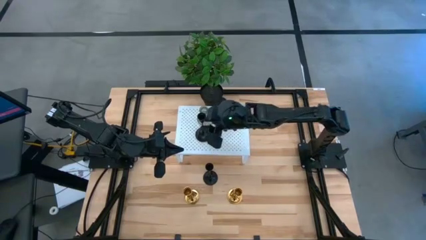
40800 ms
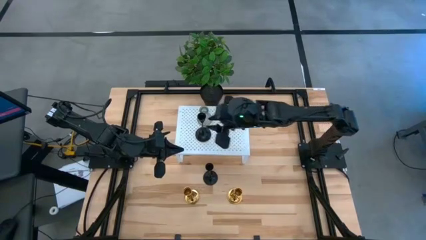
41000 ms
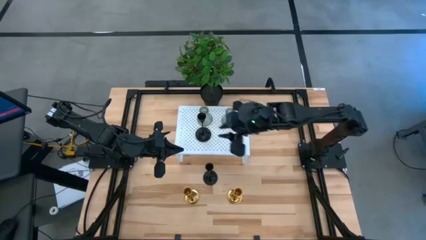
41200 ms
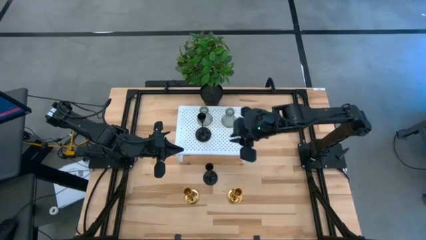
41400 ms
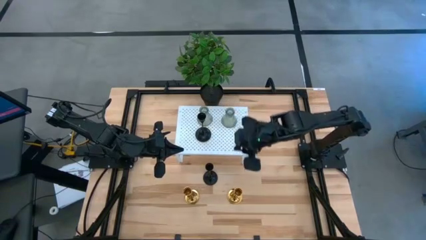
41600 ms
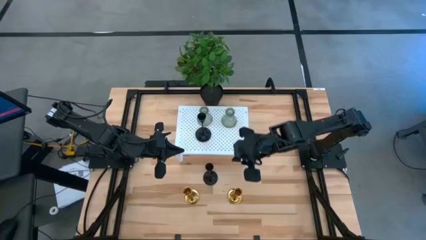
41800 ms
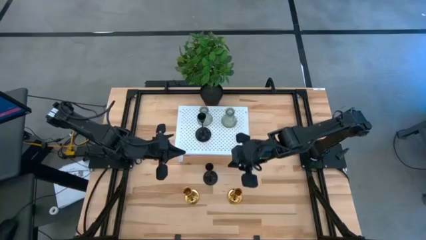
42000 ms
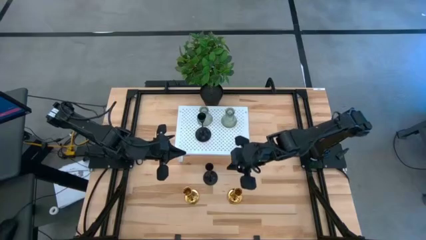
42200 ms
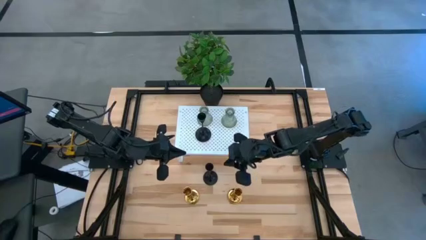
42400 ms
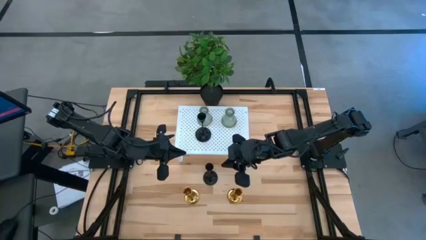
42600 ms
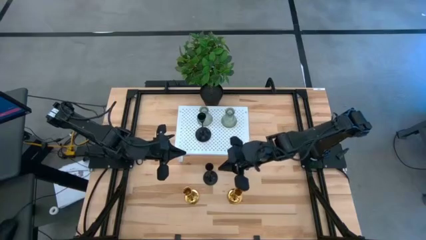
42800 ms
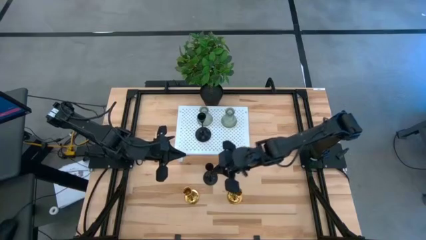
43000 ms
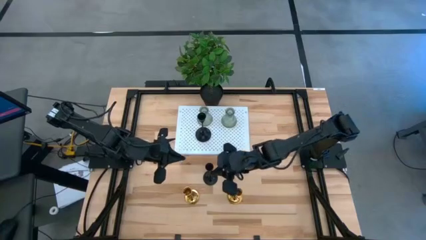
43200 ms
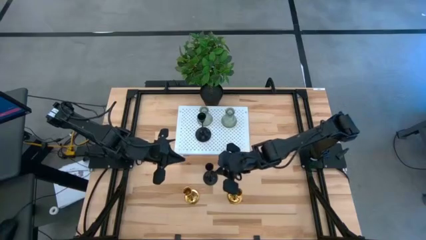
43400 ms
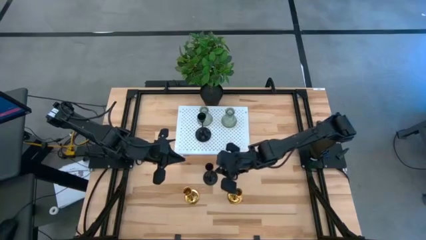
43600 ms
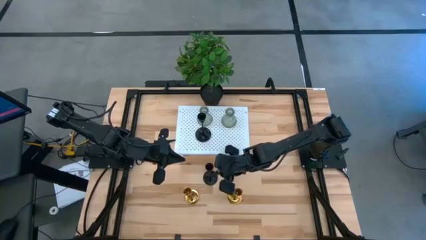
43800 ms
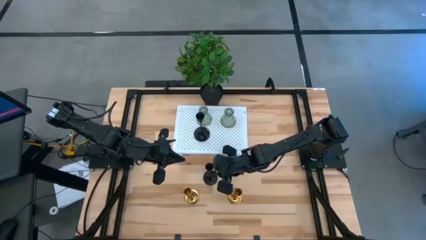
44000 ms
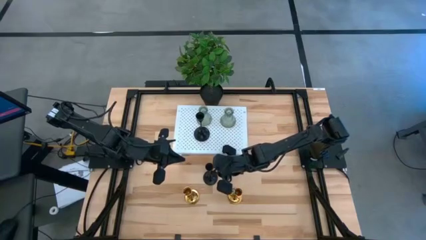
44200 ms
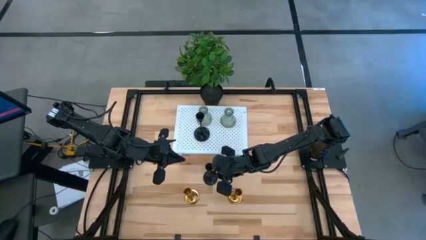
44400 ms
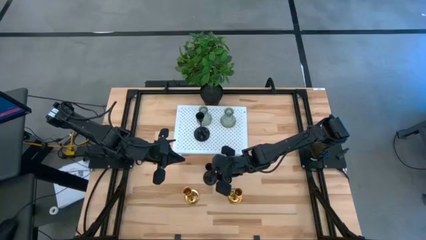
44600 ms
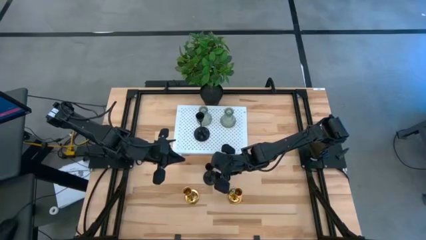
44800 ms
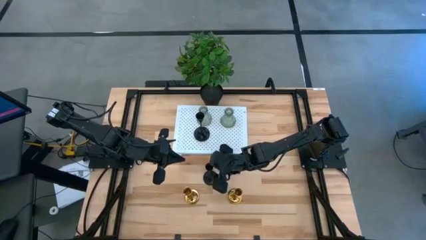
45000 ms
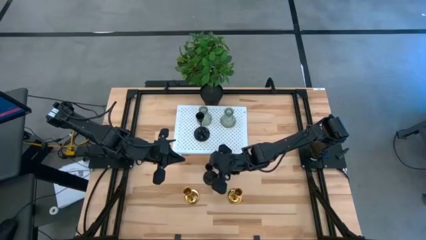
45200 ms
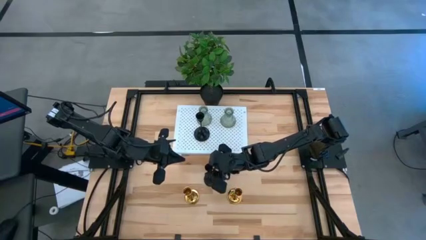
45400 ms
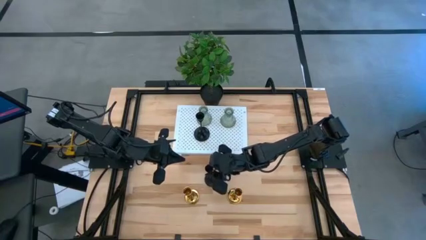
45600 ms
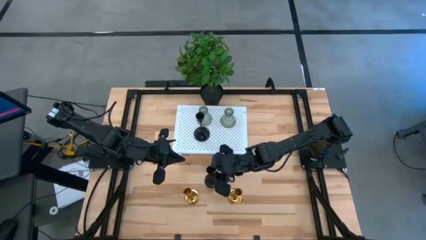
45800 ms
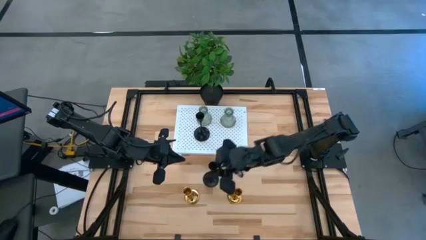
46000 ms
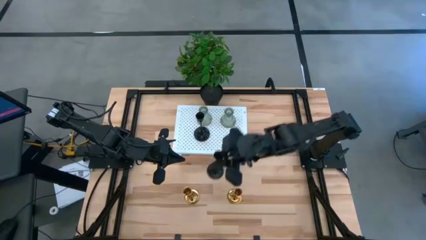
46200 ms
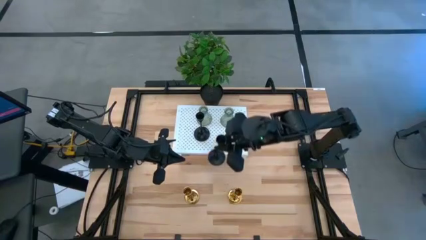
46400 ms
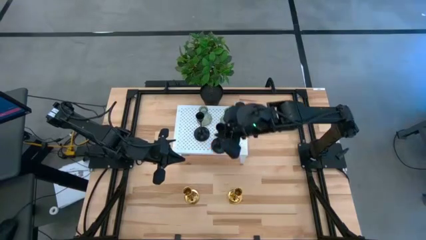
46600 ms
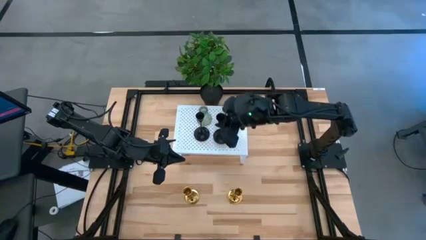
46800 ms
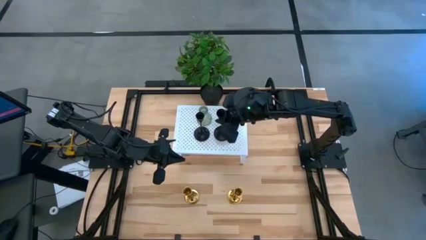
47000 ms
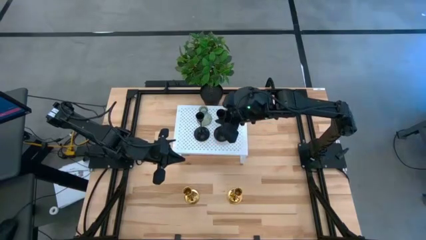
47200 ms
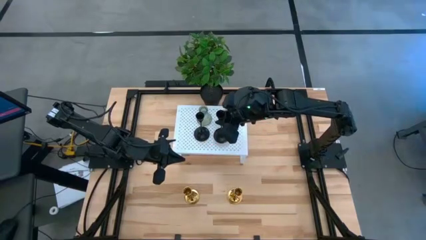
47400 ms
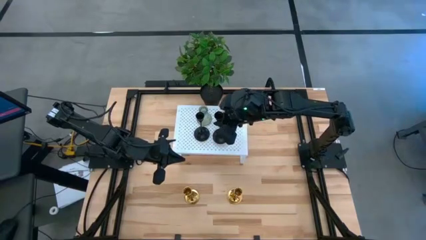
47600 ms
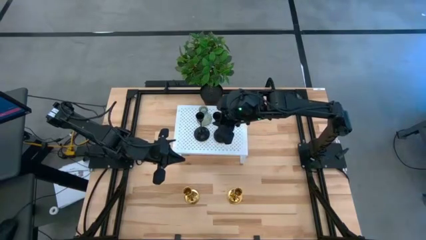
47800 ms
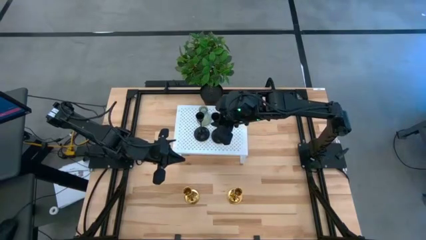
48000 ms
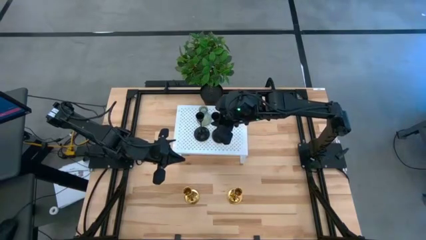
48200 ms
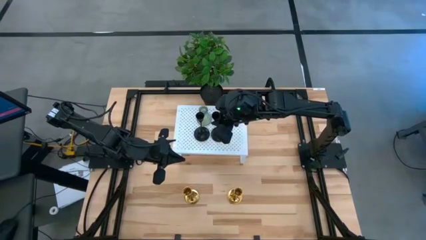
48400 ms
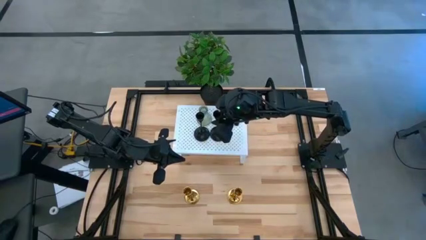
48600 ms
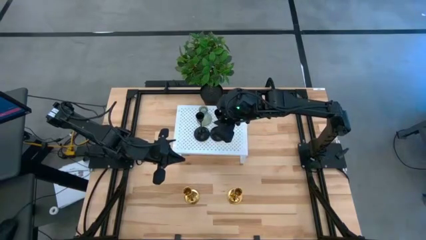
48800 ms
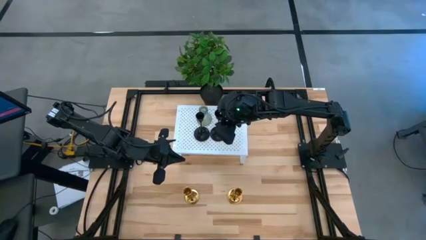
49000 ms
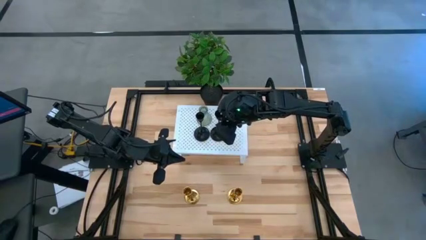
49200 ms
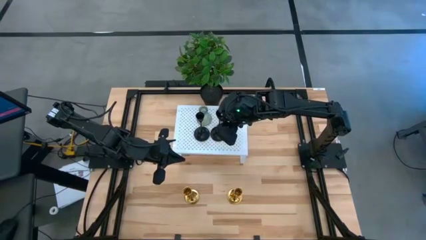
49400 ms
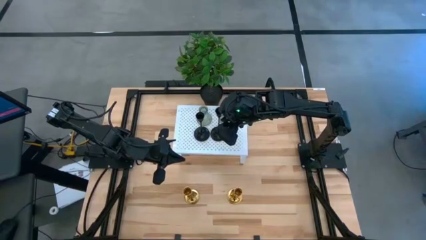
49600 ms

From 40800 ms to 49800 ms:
Task: Pick & Place candle stick holders
Put the black candle holder on the shelf

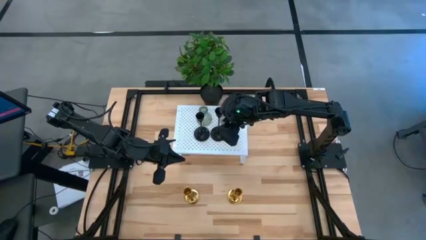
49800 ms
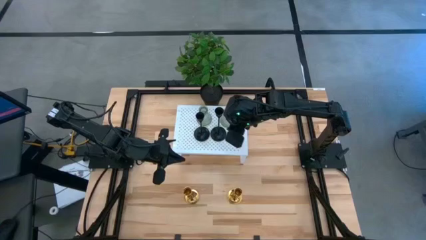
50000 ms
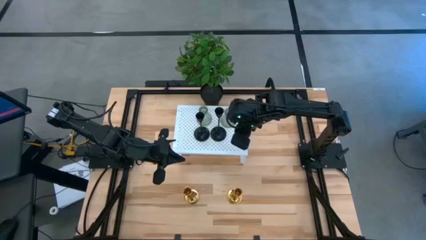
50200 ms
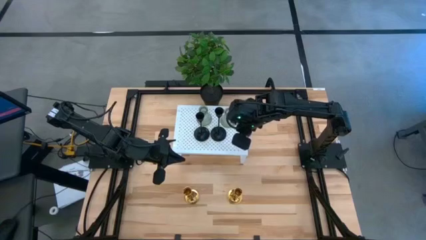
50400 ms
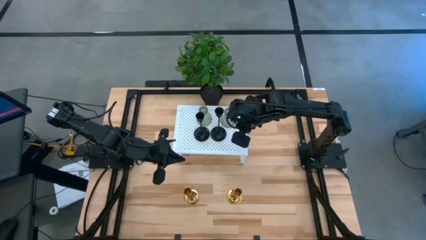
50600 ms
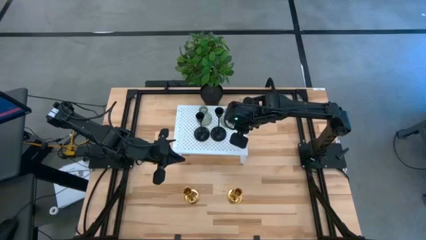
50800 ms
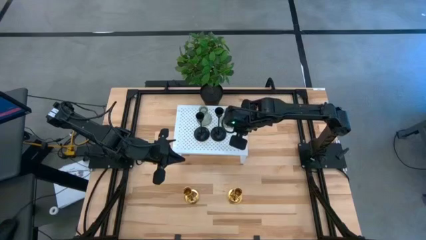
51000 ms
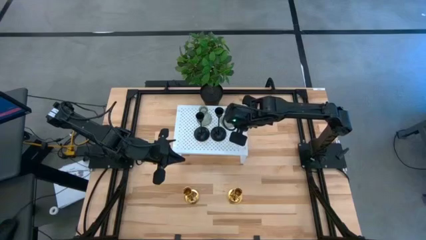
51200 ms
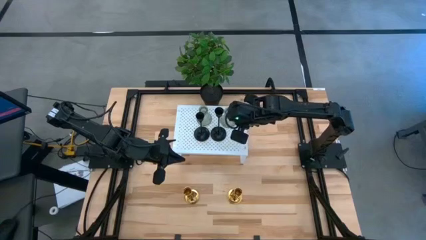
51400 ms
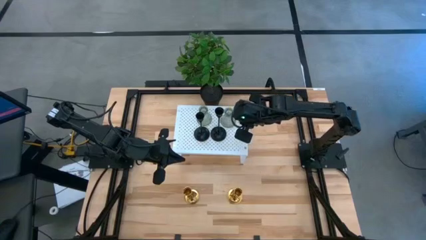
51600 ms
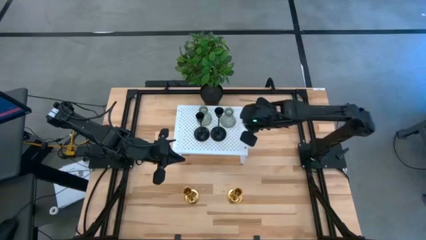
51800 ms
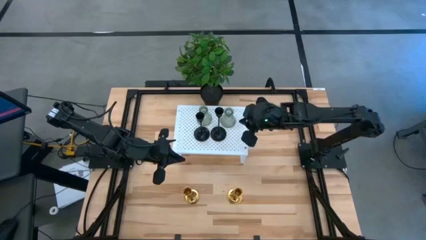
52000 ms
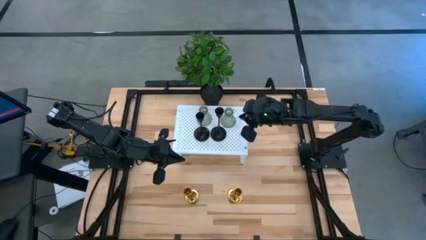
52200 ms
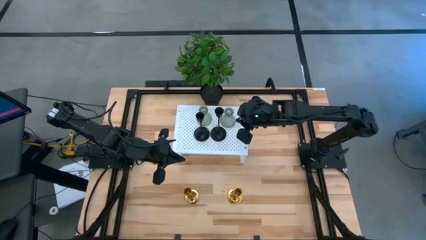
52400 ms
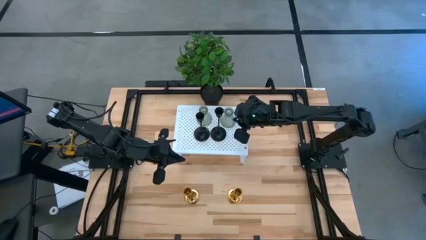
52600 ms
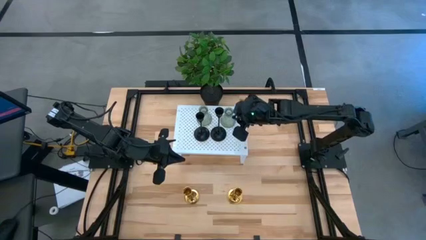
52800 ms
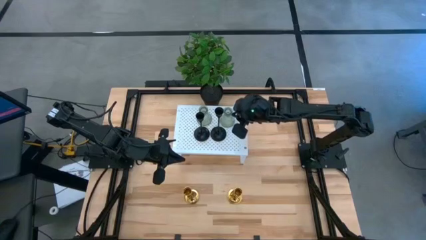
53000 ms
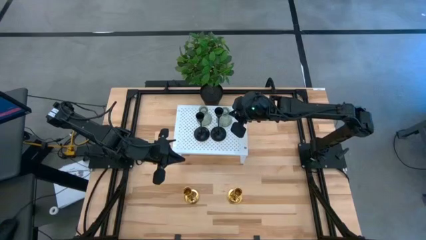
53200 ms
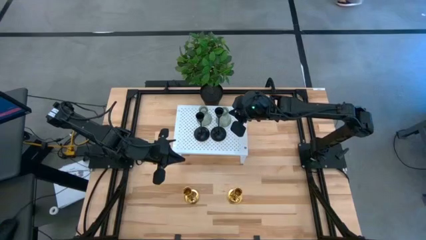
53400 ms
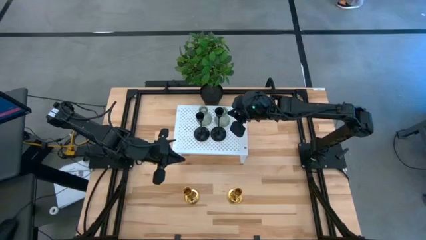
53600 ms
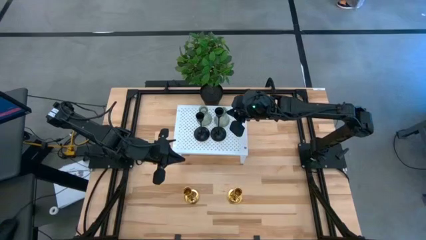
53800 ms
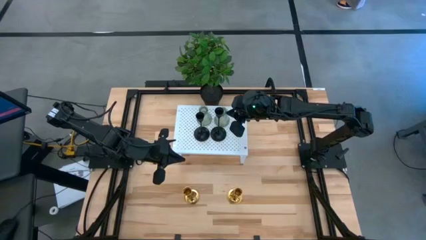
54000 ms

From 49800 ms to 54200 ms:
Adjust the green candle holder on the shelf

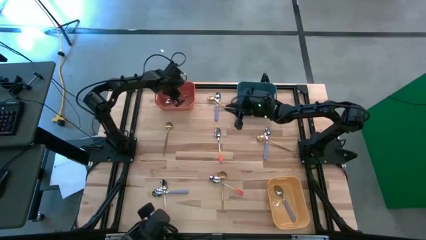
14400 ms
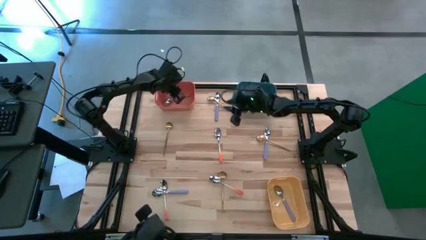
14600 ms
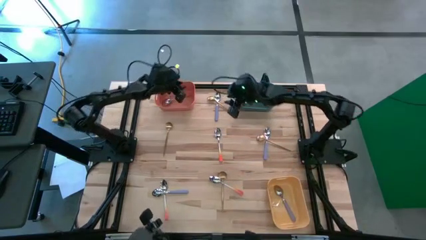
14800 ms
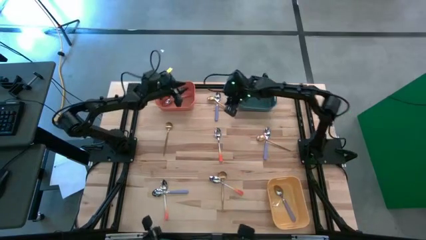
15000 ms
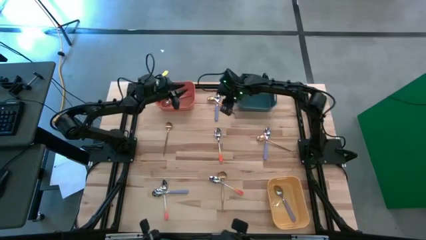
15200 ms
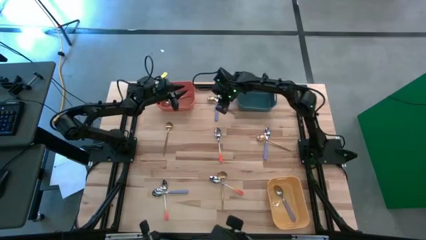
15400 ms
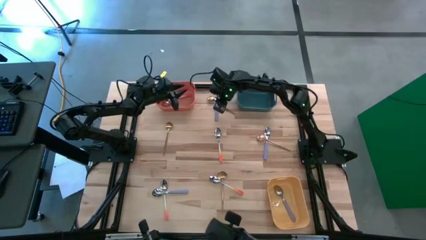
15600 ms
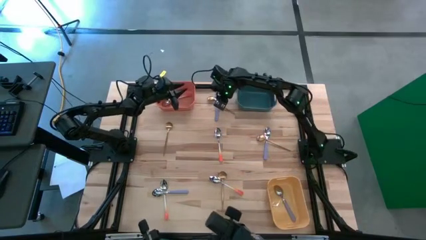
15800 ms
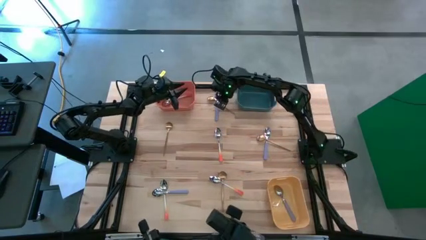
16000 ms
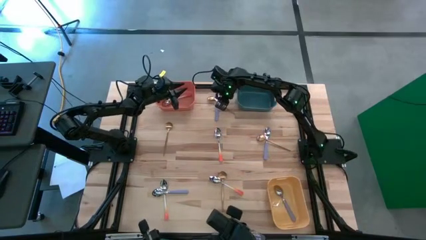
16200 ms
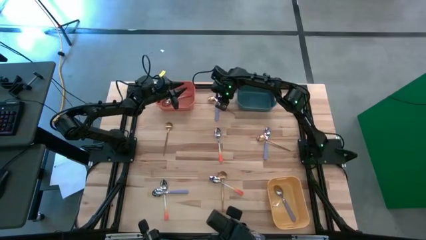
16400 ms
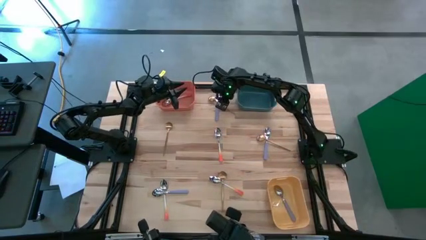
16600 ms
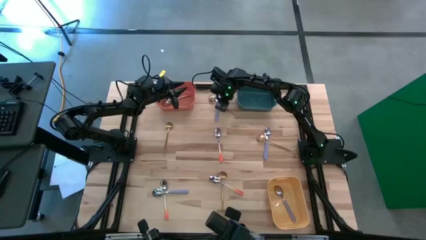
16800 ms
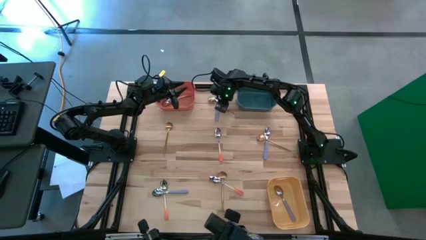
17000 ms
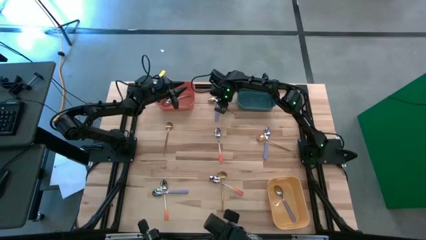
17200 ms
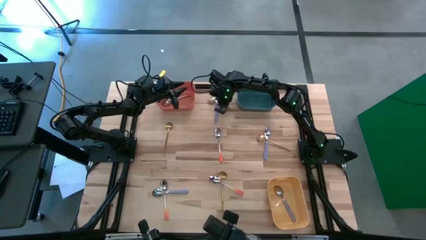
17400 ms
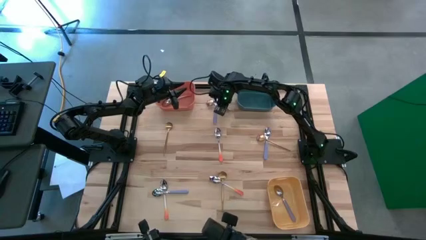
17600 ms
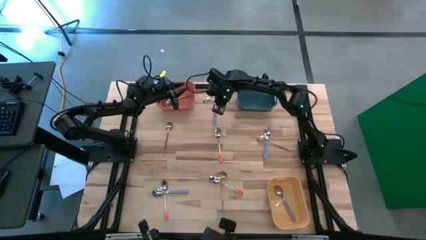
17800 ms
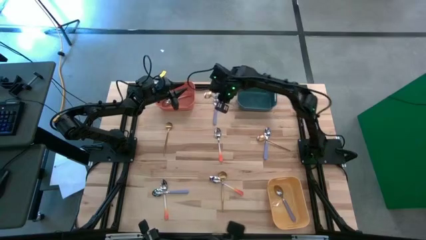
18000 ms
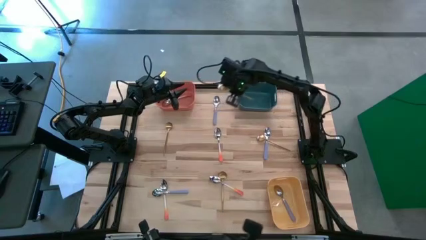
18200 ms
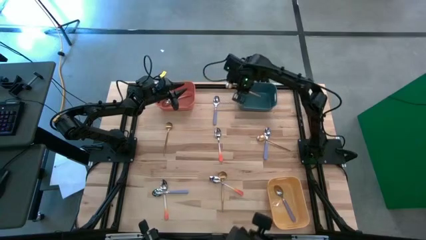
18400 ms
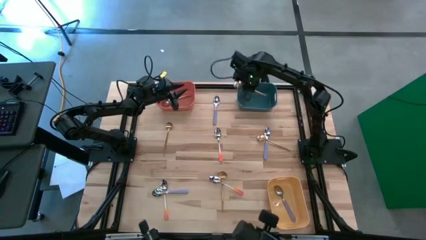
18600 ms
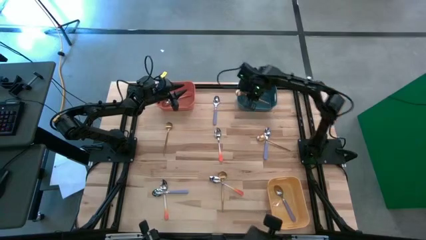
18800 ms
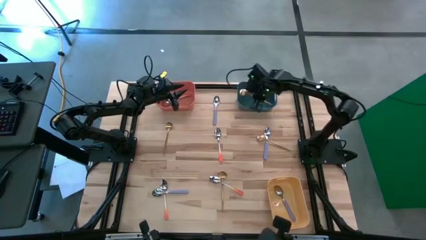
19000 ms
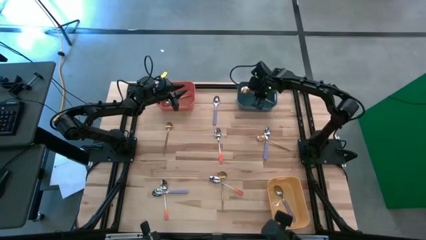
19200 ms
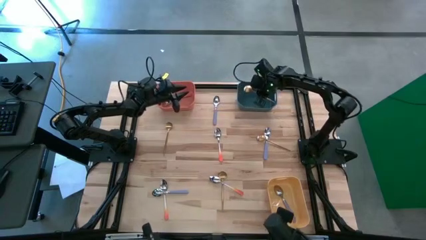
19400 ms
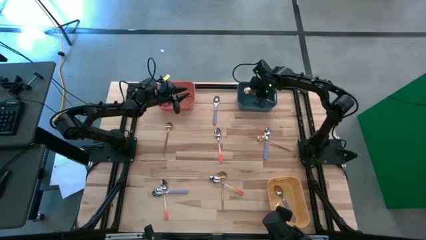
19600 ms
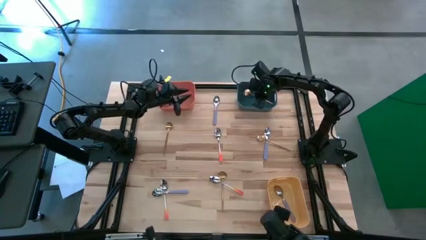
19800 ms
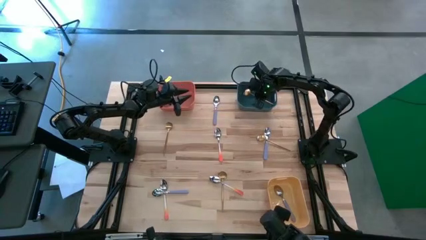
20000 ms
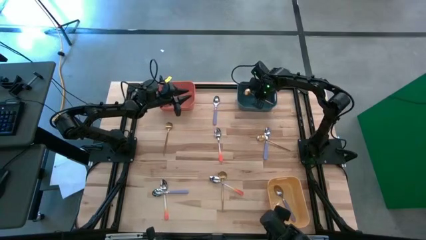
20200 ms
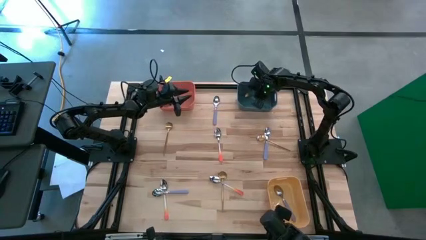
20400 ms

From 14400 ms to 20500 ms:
Task: Sort silverware by color (type)
Put the gold spoon into the blue bin
